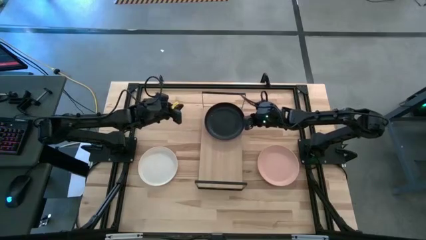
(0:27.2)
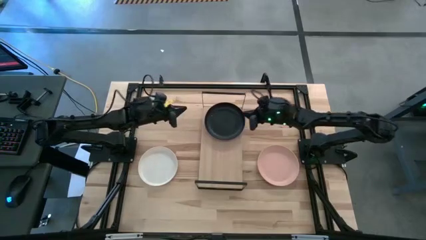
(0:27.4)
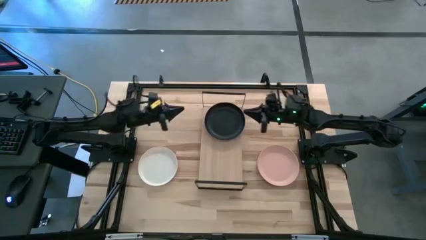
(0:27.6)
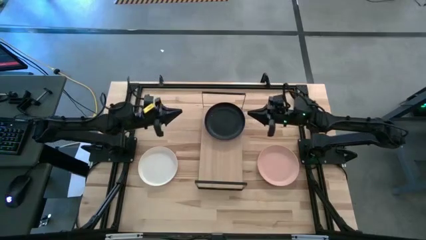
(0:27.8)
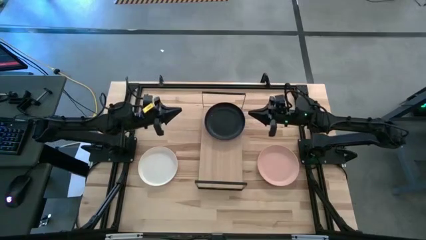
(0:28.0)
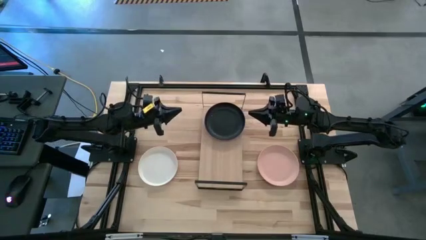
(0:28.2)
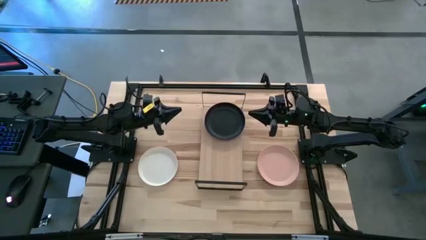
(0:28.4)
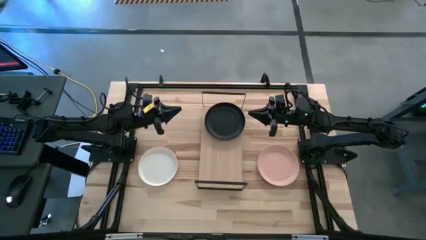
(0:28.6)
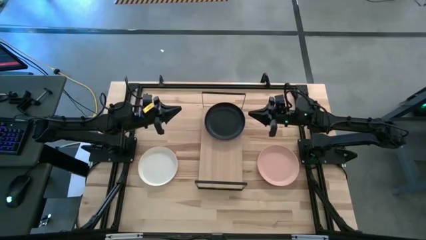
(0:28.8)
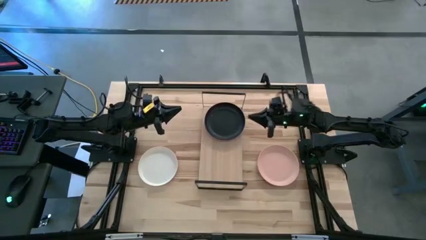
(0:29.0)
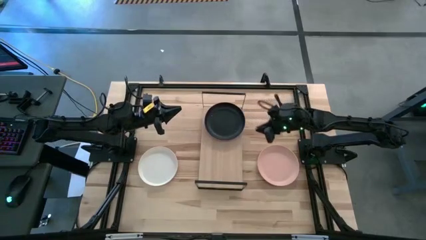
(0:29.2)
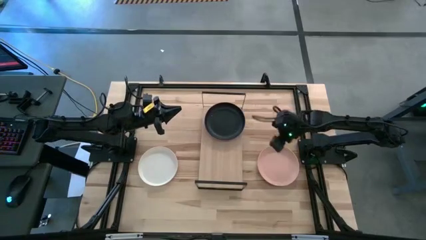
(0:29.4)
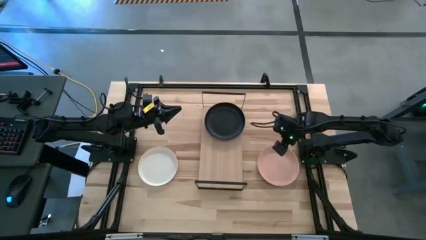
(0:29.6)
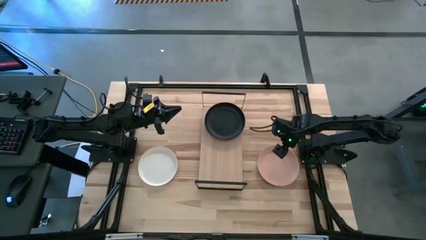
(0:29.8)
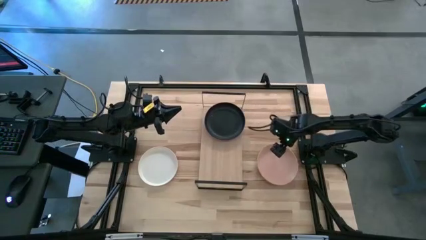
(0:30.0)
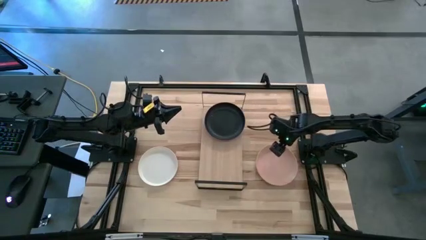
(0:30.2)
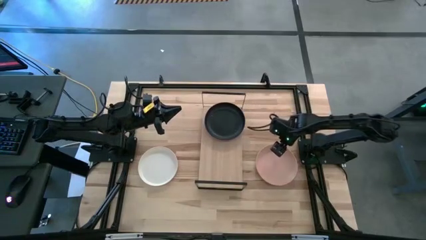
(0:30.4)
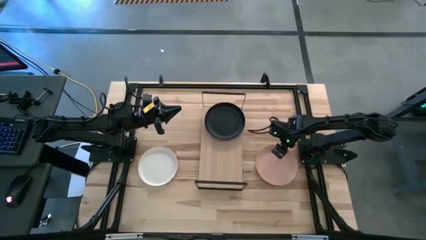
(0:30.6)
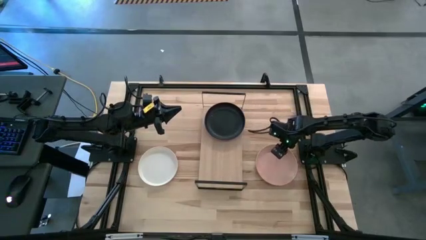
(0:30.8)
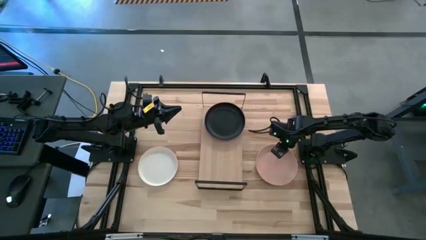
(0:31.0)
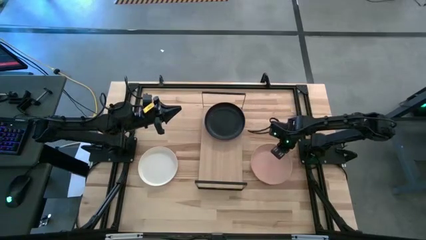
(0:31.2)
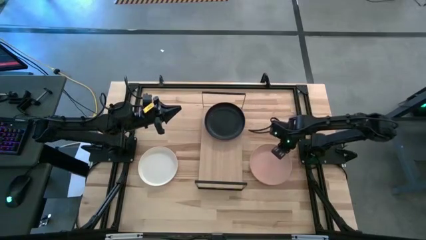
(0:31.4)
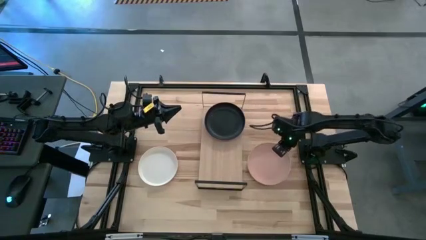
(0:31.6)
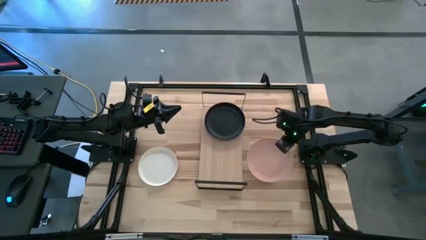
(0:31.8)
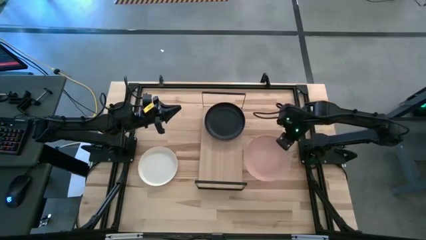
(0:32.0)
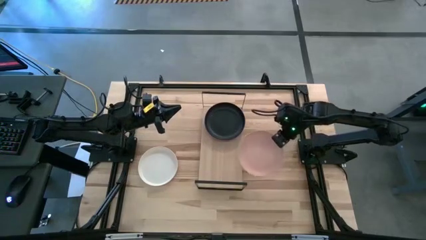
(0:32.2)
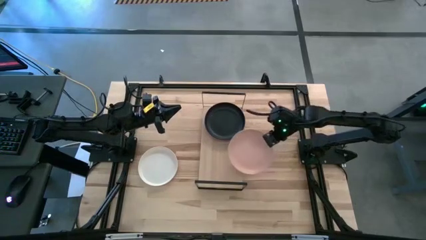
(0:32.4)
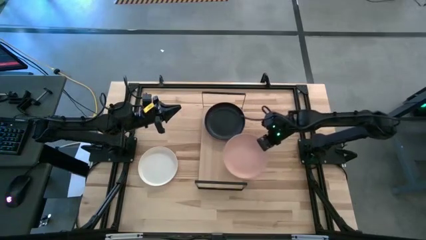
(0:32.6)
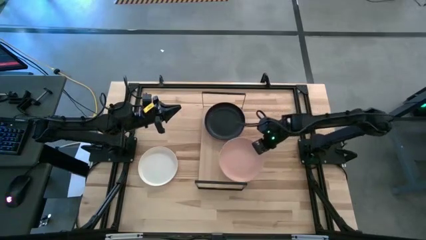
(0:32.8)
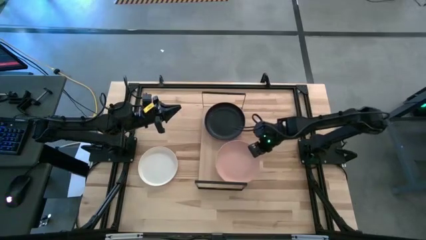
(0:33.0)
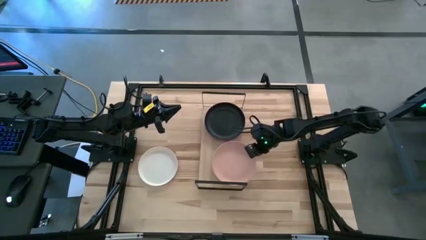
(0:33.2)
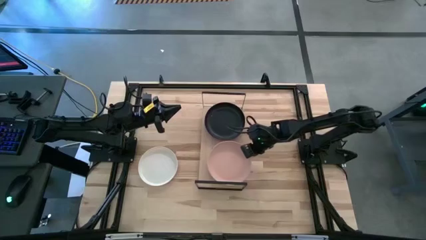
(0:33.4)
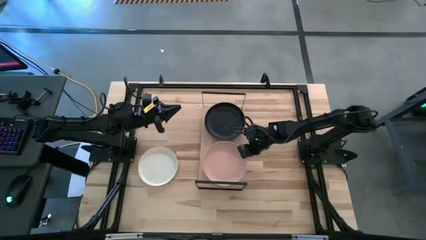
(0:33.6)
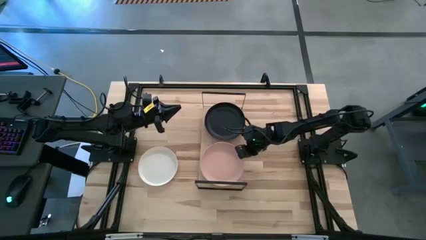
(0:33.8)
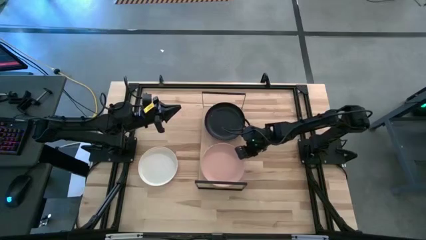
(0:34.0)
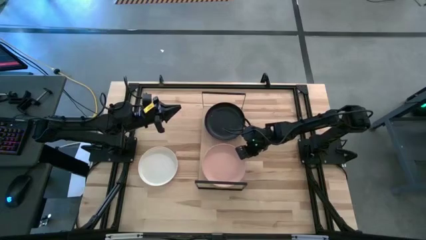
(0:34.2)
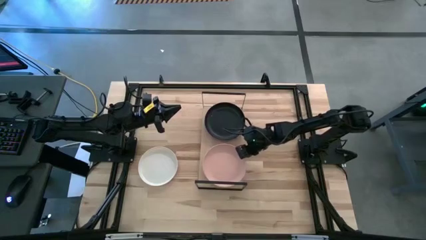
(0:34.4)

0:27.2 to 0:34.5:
Task: Place and stack plates onto a shelf
Put the light pink plate on the shelf

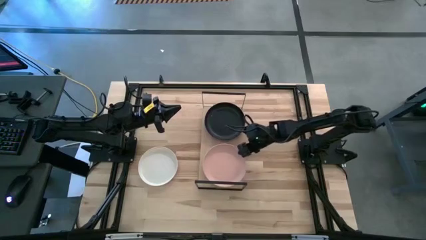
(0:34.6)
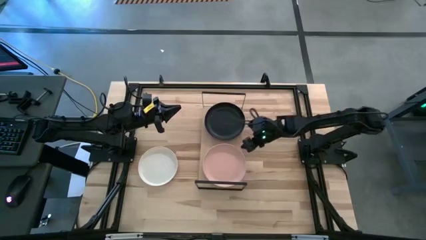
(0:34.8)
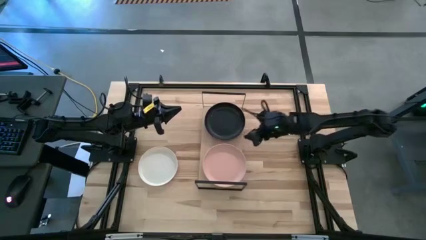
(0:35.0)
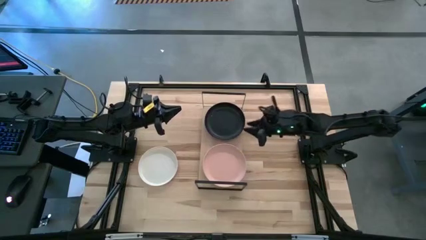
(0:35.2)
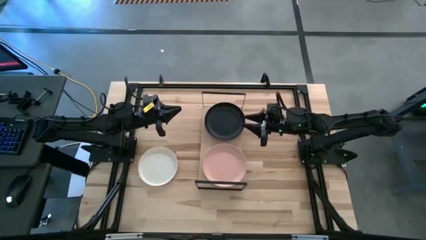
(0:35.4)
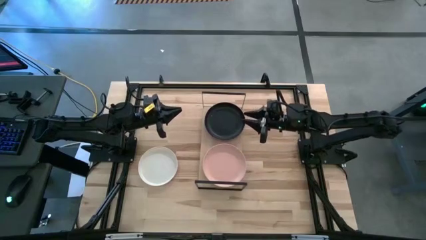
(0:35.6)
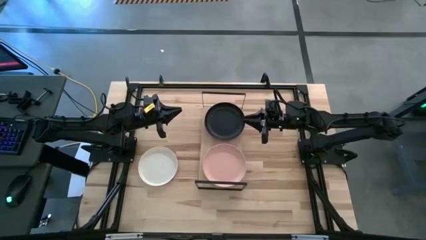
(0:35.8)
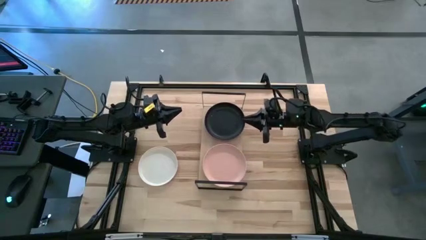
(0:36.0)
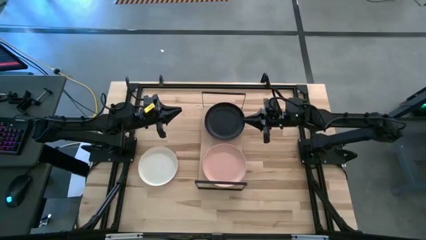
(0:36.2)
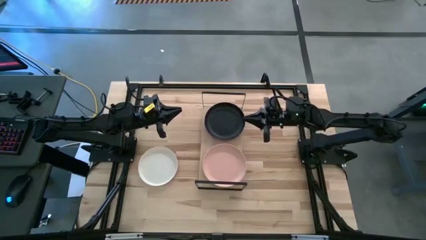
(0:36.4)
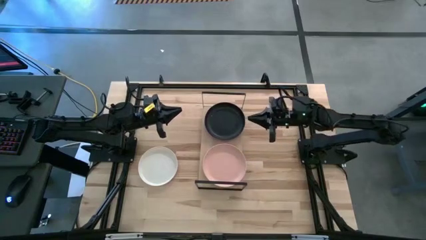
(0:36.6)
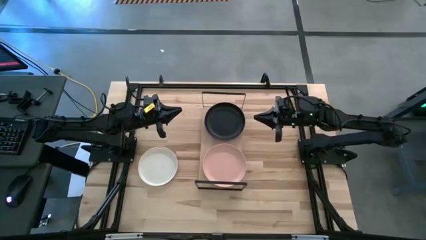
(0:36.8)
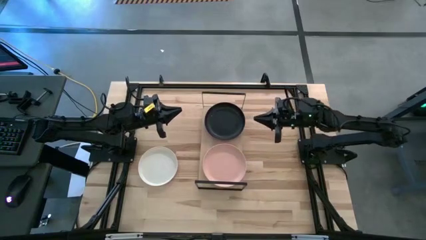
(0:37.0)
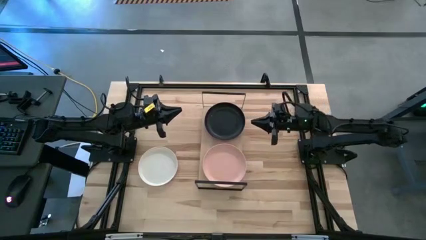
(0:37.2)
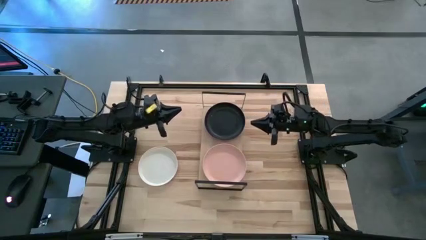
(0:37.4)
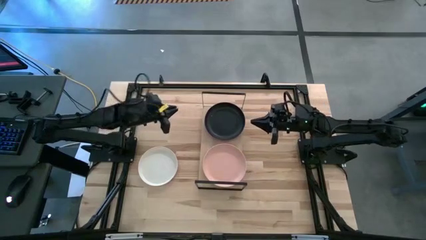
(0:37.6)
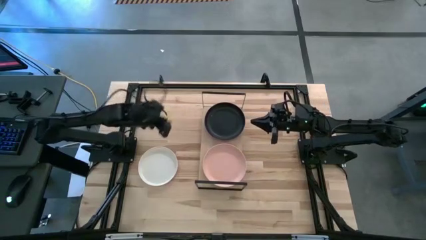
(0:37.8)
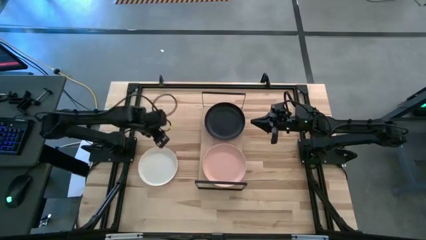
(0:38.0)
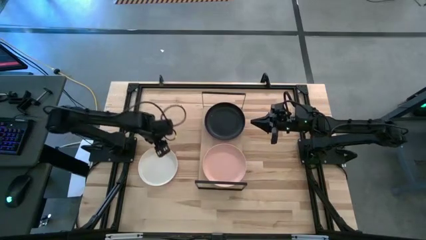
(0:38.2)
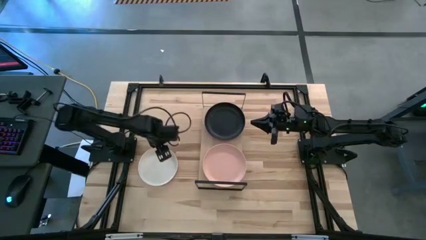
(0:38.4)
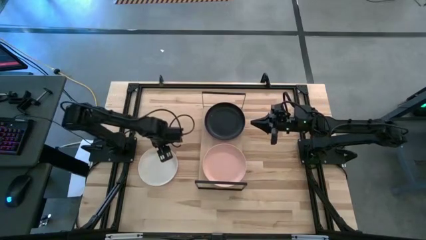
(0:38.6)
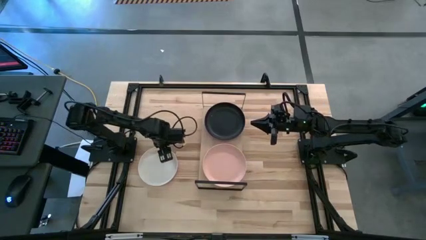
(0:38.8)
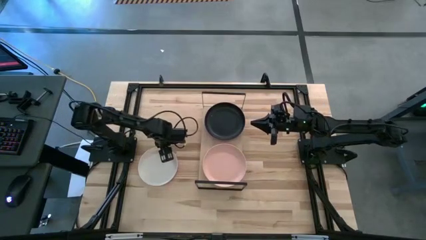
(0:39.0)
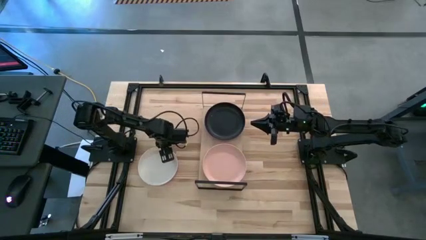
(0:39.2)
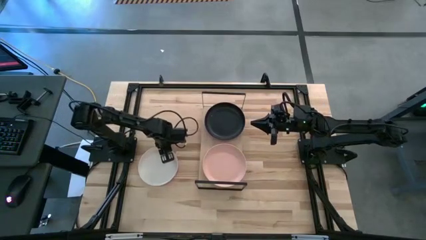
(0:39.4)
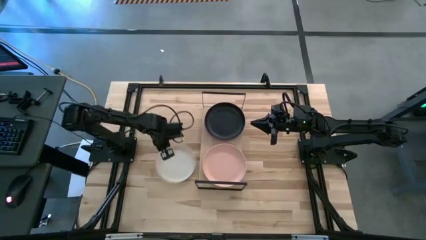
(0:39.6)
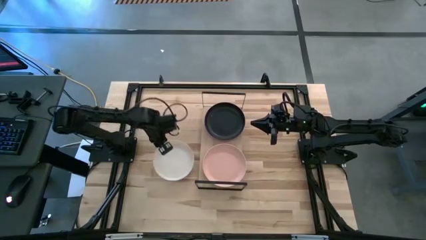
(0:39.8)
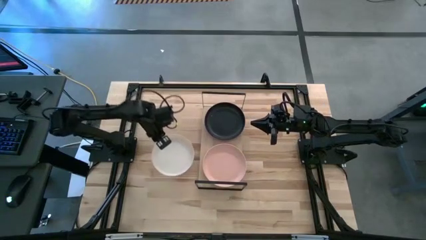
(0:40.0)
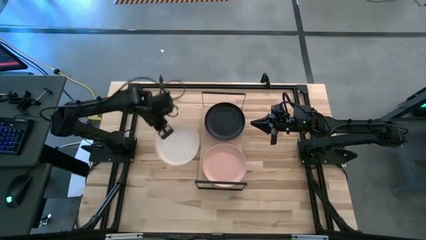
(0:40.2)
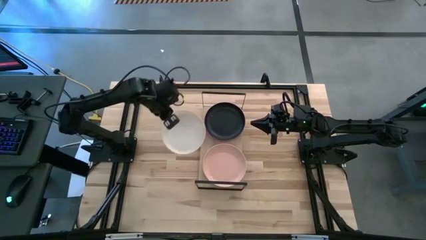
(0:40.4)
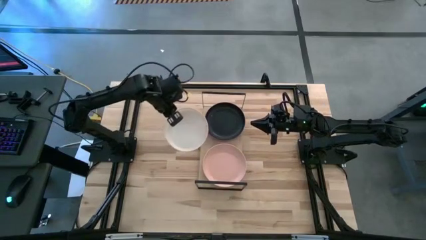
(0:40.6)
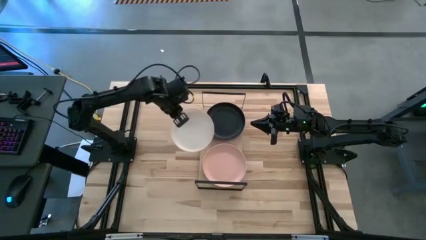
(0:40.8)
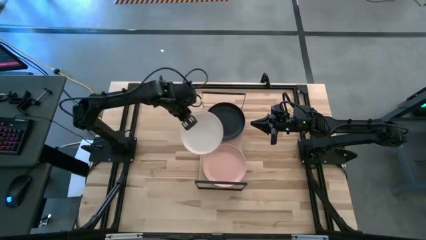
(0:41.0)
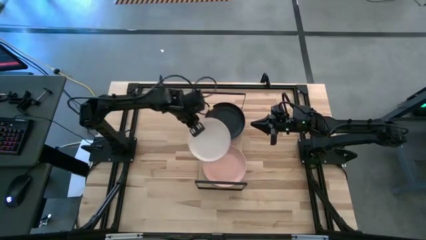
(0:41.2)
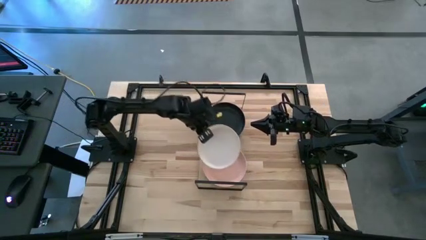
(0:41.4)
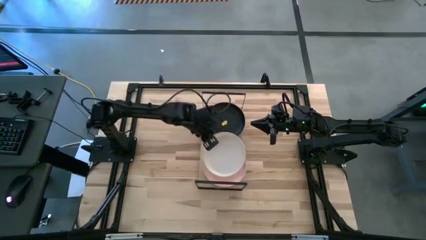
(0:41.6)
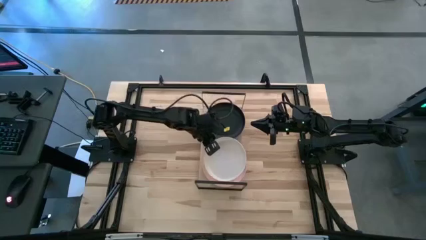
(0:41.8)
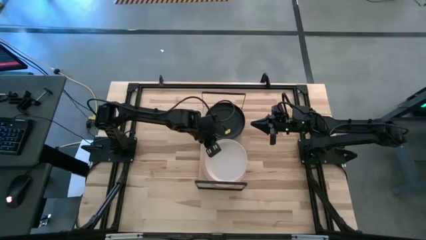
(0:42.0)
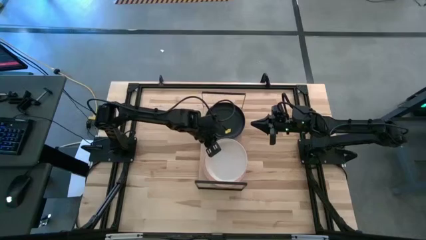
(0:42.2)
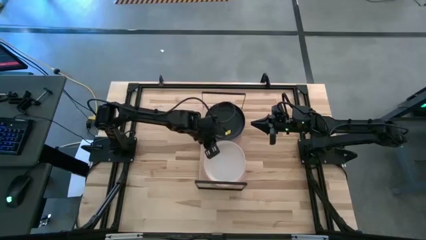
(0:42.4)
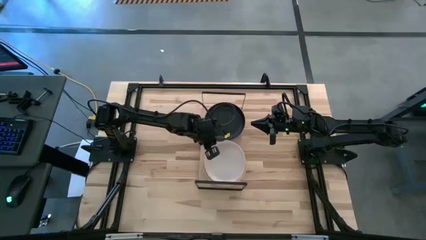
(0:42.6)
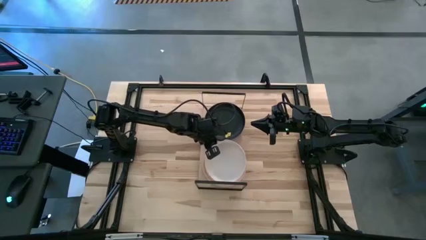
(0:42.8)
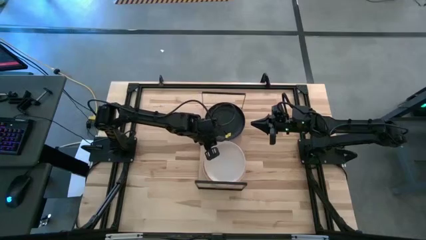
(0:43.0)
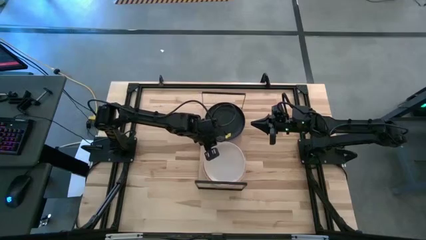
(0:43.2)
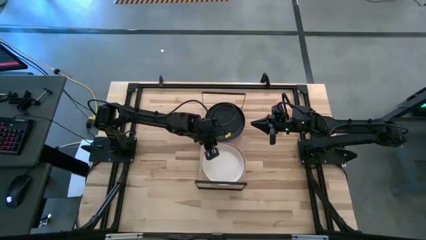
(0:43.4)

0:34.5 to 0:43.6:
Stack the white plate on top of the light pink plate on the shelf
